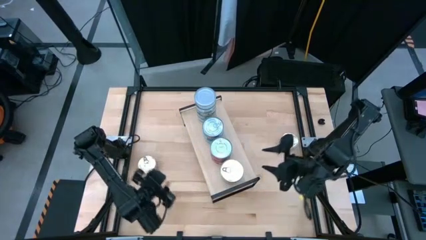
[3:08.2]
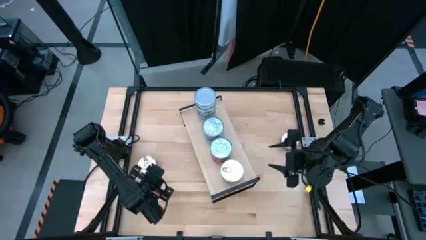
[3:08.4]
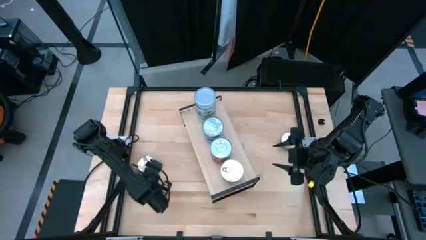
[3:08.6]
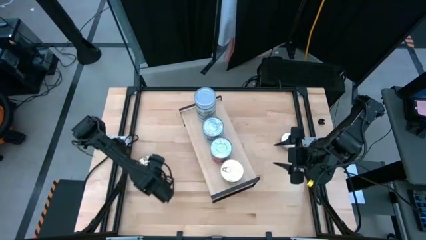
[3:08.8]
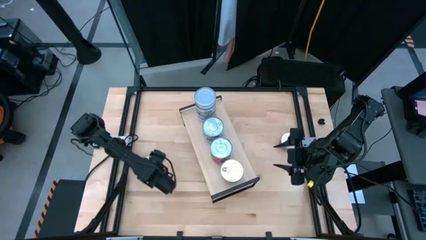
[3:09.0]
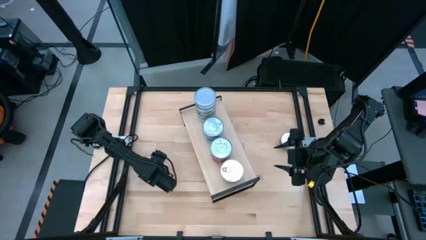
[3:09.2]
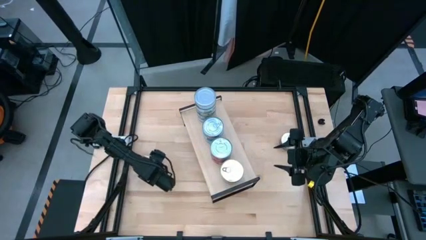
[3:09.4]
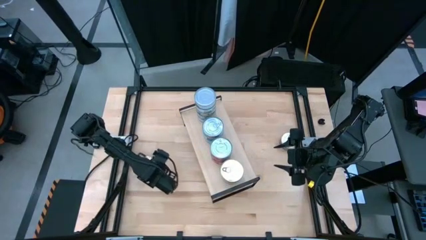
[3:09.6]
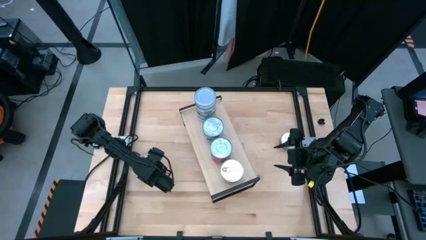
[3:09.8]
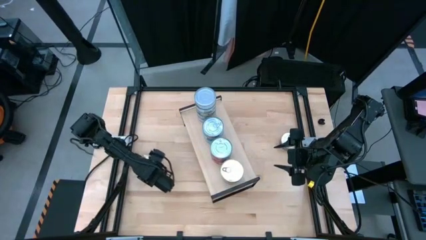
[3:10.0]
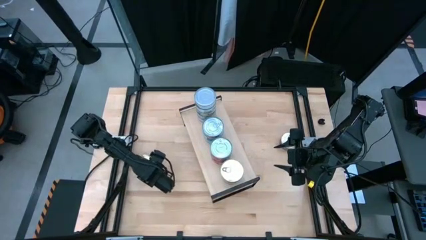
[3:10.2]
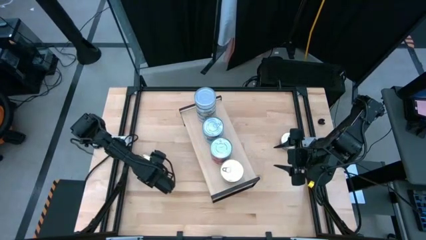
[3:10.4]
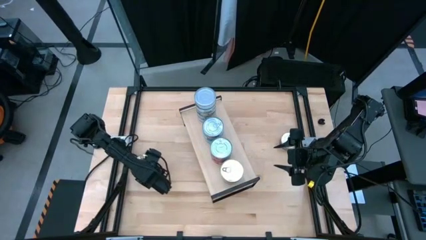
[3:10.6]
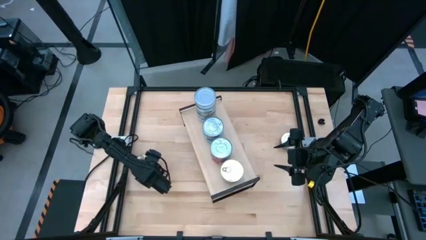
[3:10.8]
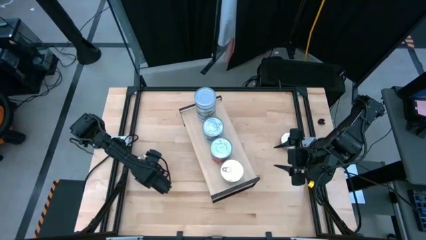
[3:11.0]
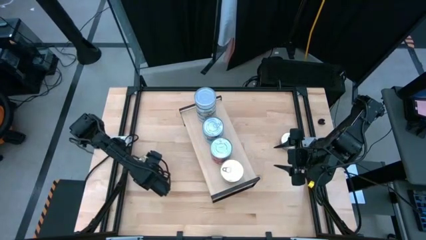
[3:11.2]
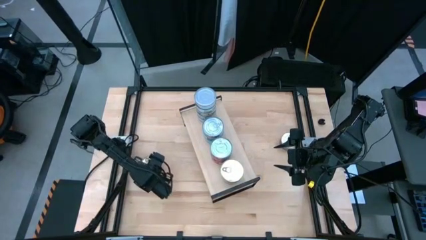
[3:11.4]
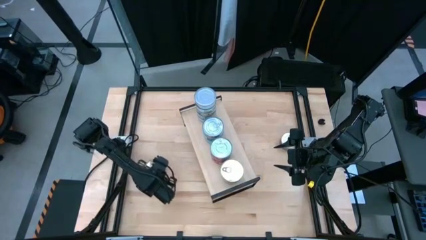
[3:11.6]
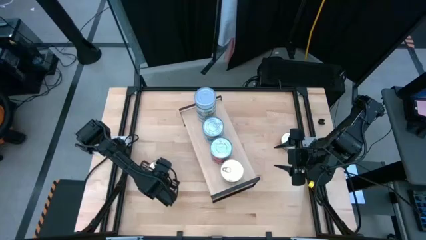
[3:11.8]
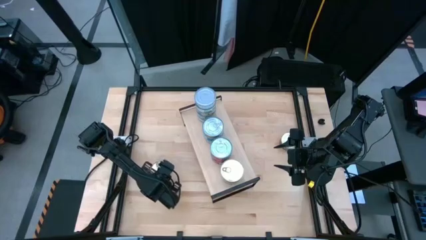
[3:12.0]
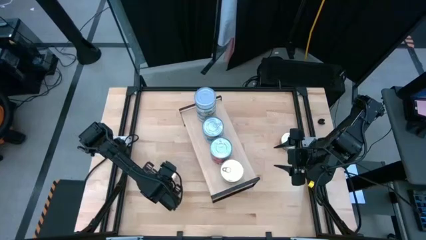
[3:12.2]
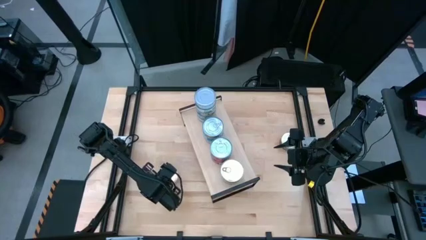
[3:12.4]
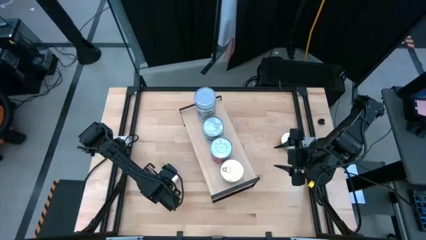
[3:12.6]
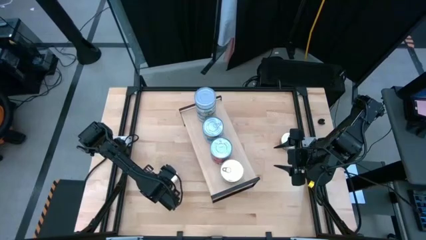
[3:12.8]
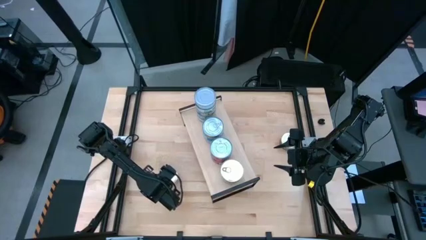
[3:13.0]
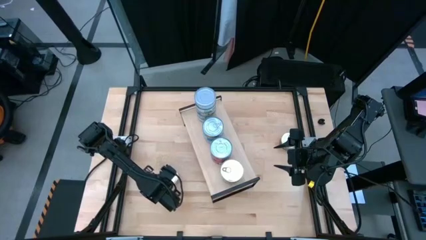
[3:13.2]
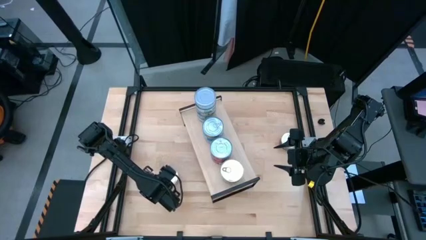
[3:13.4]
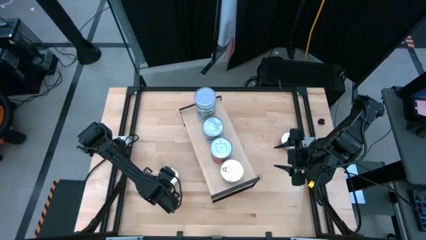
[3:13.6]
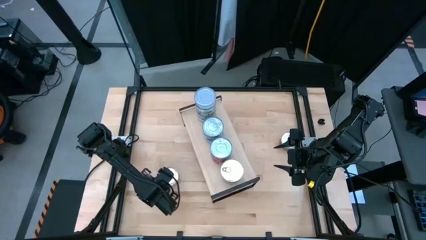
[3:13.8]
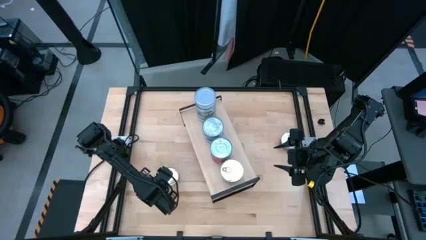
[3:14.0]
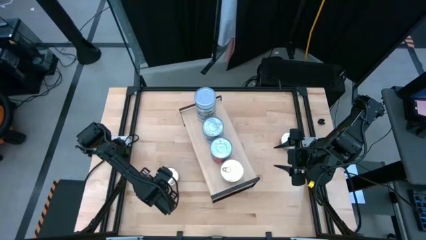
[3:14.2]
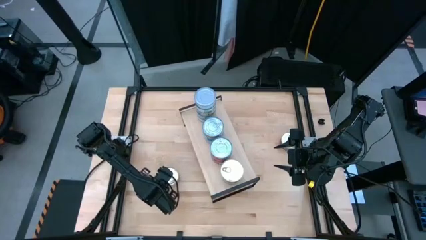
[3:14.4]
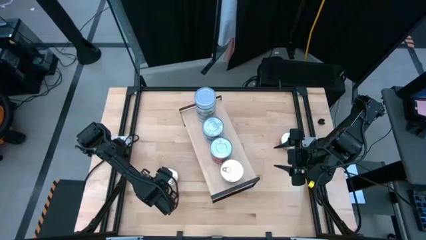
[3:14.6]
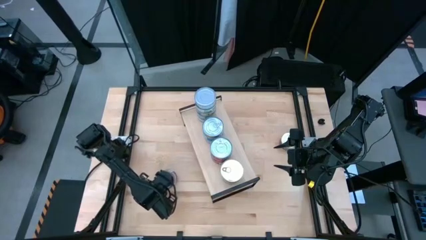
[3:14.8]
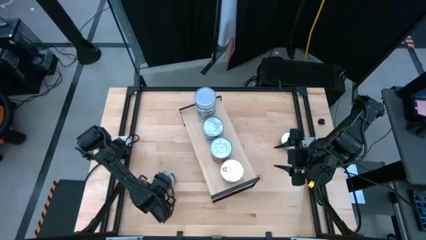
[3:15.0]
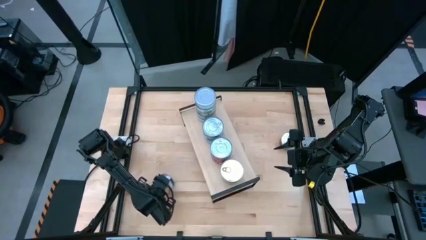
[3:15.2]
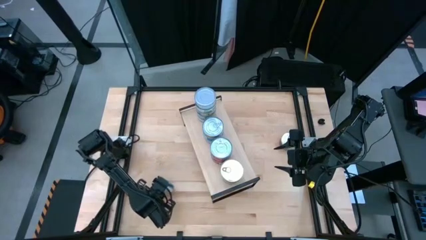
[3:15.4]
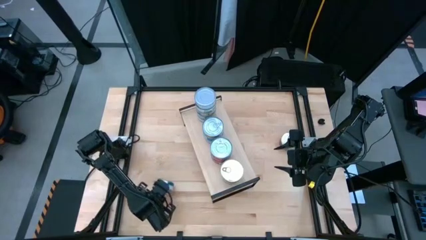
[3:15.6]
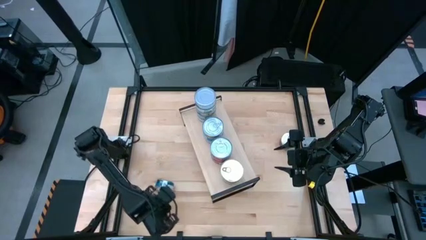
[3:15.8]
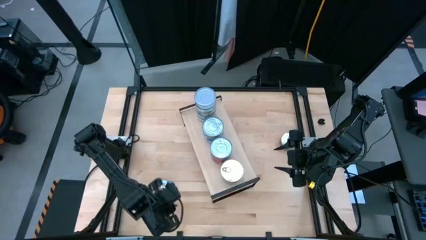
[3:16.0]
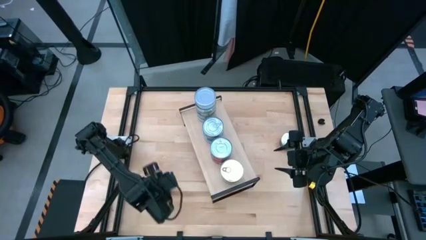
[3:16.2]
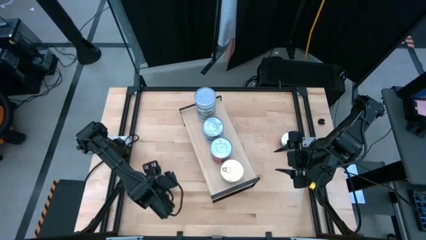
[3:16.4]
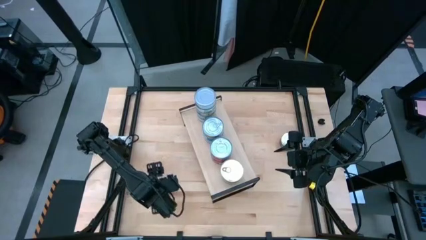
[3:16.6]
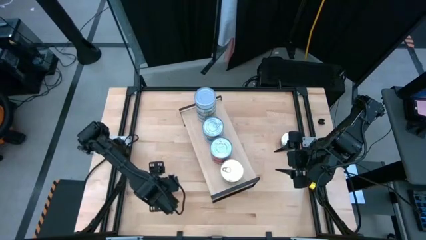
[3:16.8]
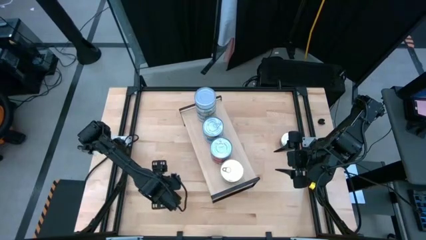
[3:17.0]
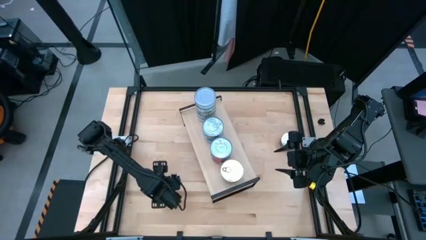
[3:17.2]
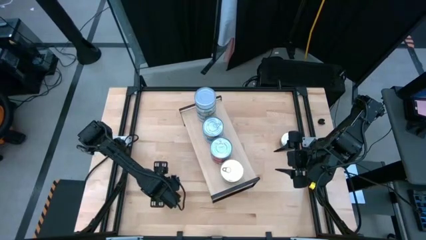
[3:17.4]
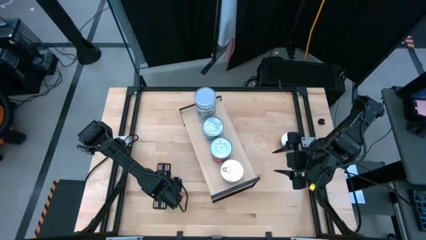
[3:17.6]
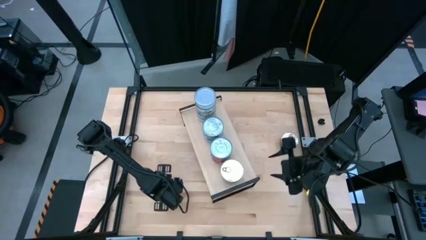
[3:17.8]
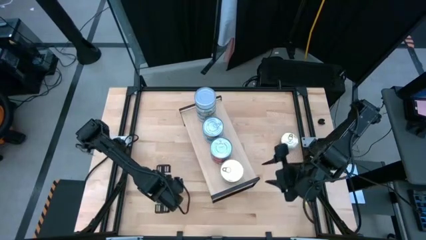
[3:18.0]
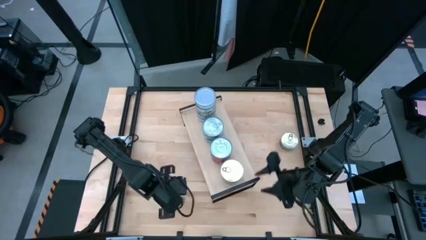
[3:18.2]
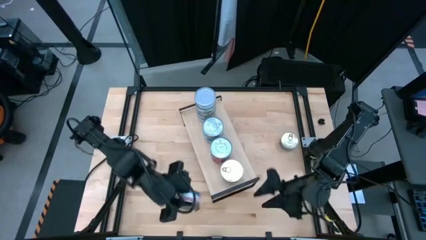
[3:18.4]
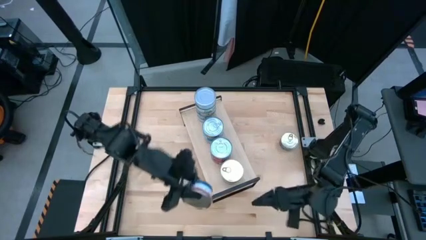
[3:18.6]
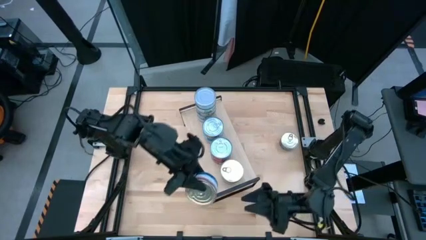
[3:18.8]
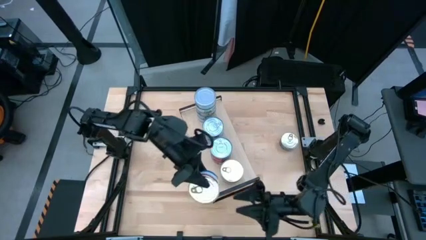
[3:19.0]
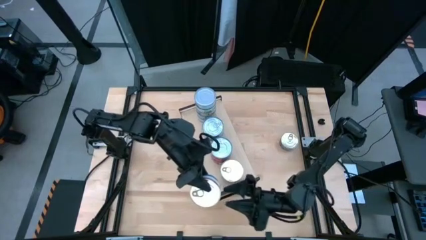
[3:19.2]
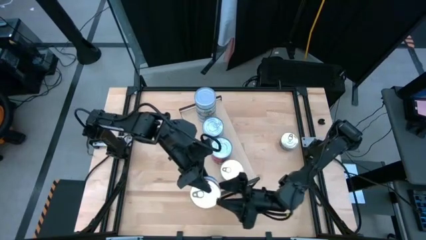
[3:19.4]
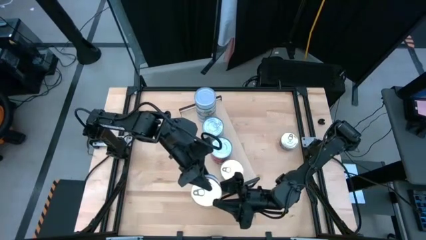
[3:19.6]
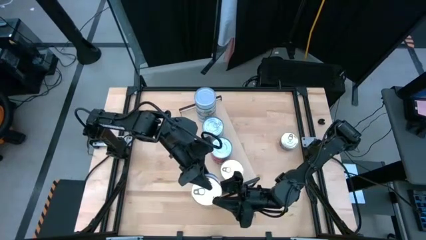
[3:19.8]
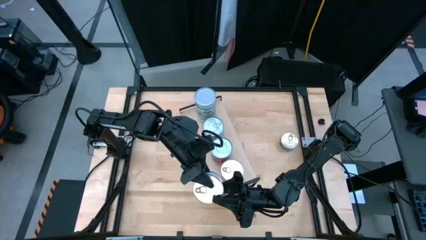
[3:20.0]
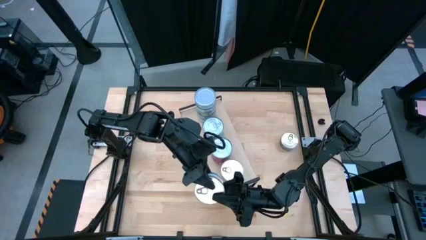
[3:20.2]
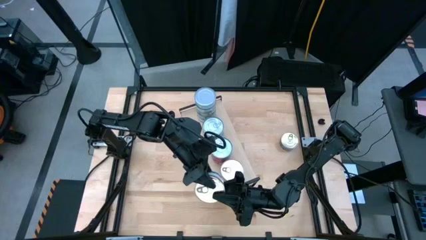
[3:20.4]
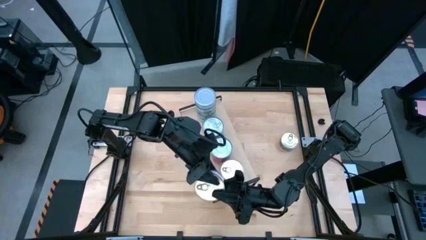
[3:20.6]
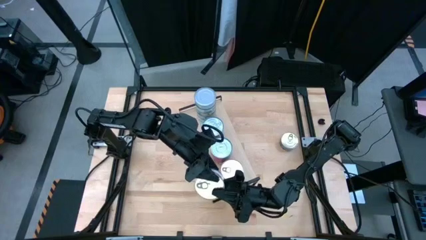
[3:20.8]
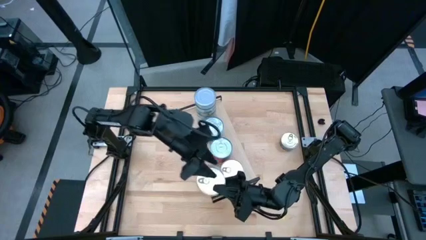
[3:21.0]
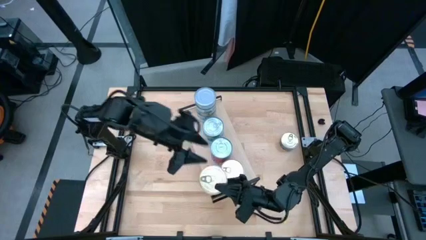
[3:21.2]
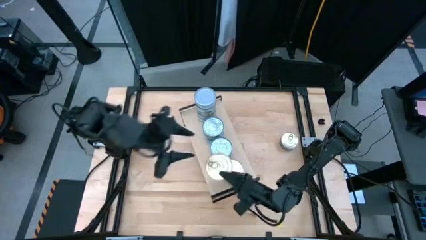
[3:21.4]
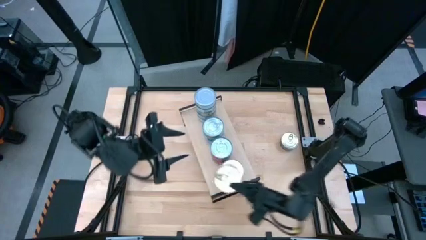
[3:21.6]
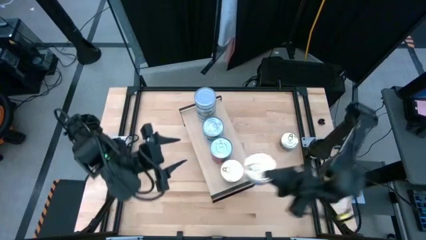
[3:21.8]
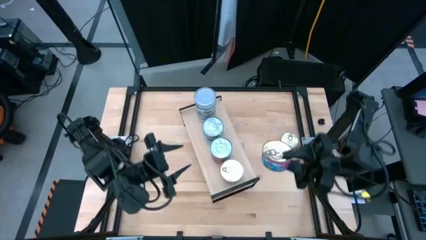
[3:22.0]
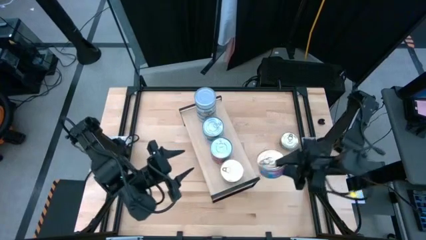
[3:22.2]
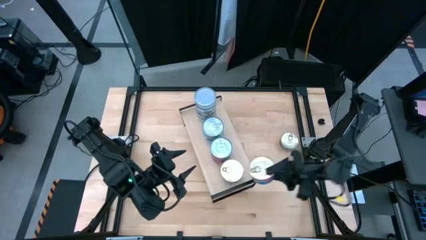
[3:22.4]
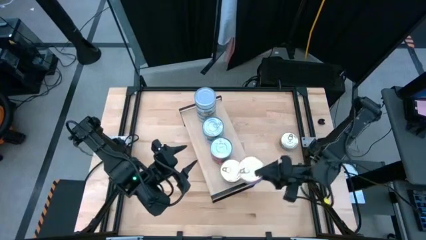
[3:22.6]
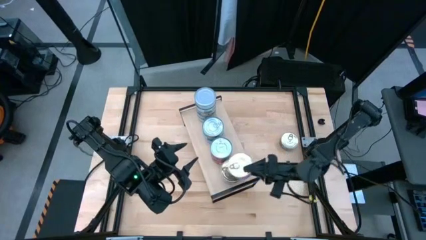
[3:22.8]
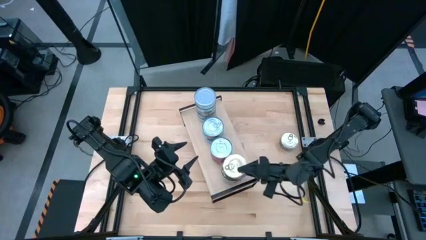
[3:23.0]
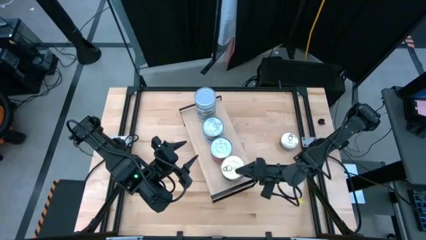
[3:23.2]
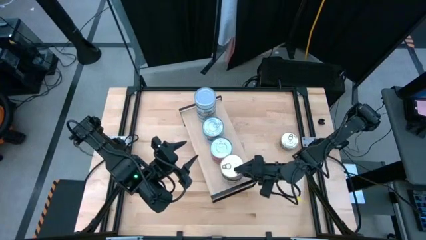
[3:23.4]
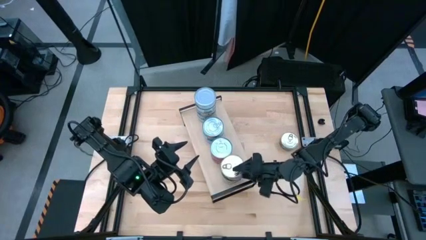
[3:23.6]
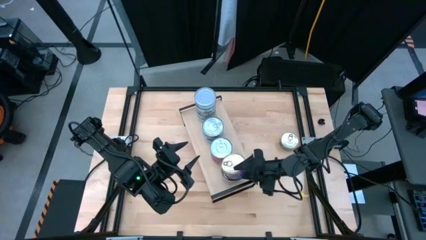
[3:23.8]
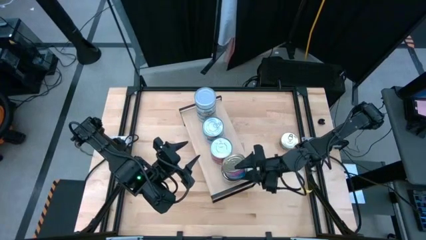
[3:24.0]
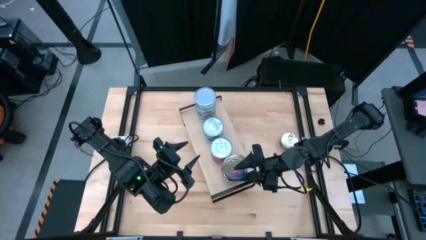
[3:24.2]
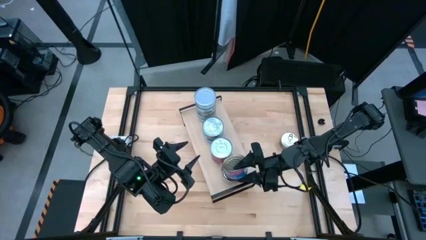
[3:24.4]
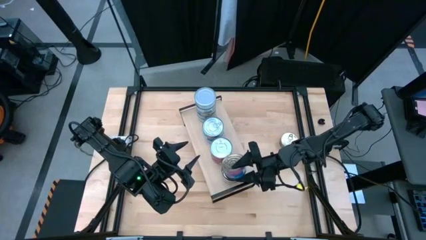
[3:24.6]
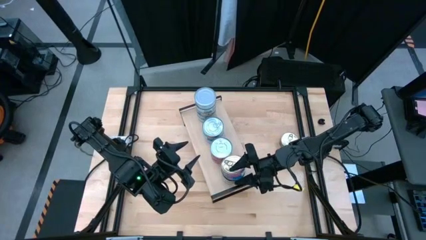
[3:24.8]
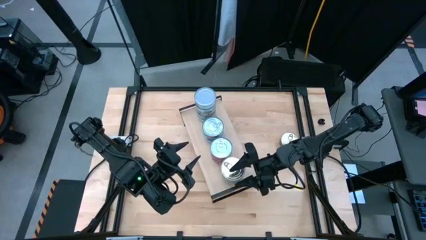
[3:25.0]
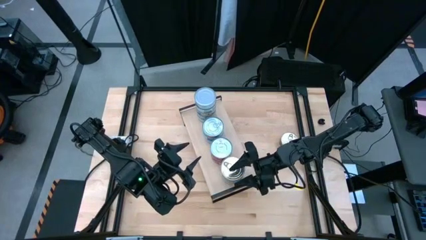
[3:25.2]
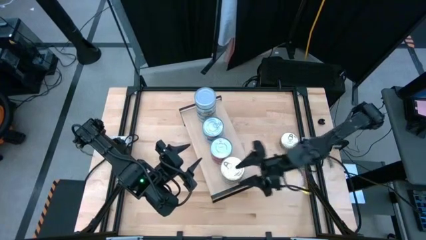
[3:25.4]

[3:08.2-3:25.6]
Task: Stack canned seafood by type on shelf
Stack the bottom left blue and pink tuna can on top of the other blue and pink tuna can on the shelf
